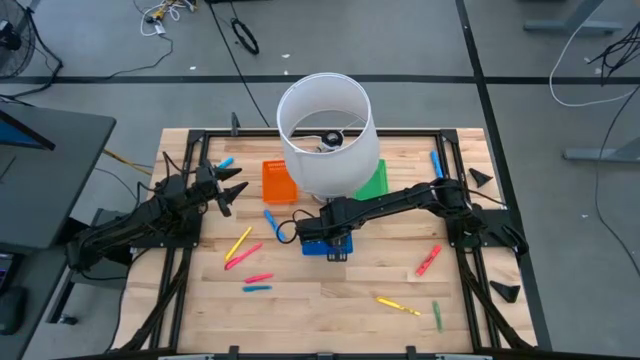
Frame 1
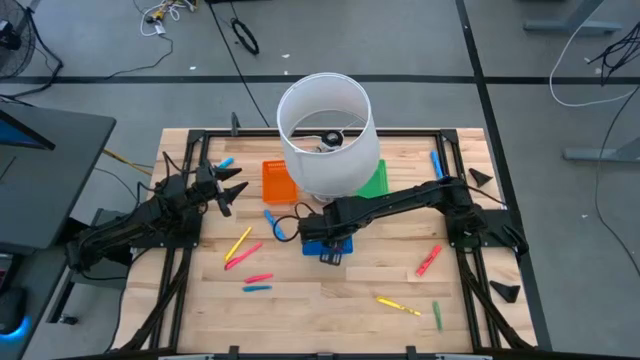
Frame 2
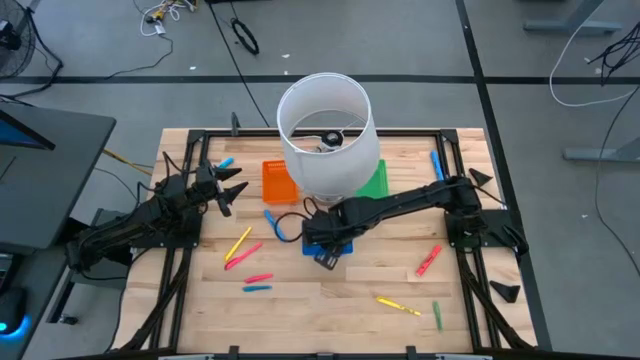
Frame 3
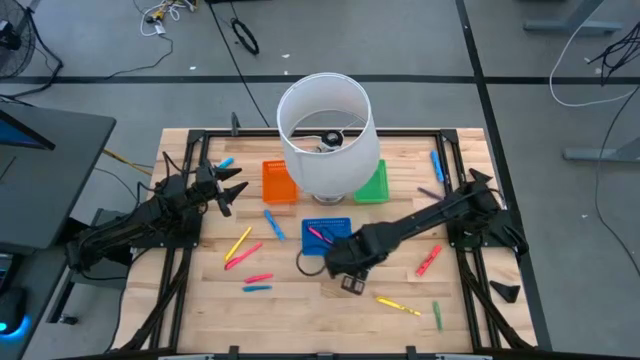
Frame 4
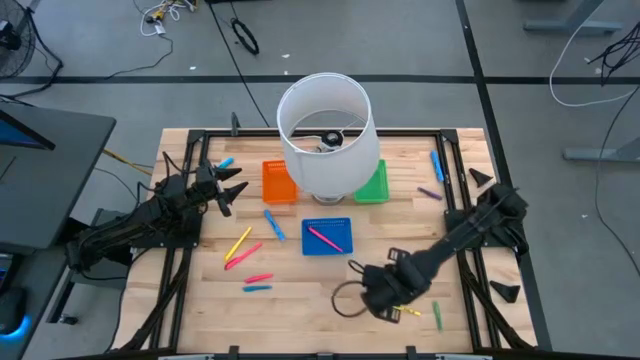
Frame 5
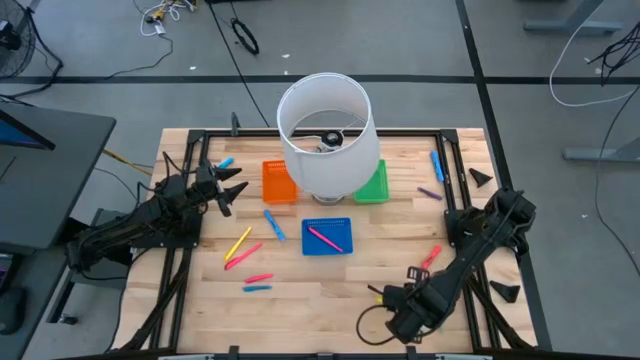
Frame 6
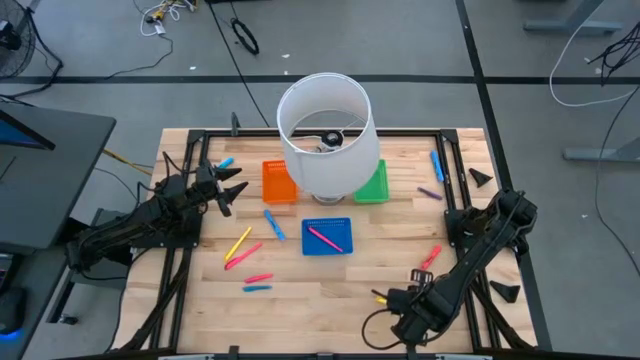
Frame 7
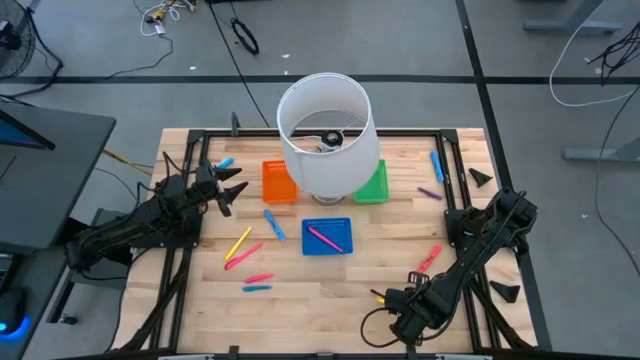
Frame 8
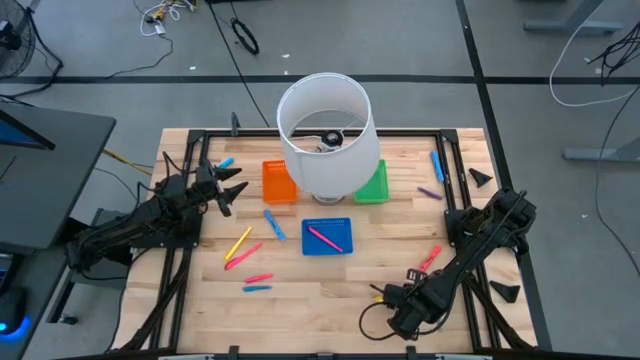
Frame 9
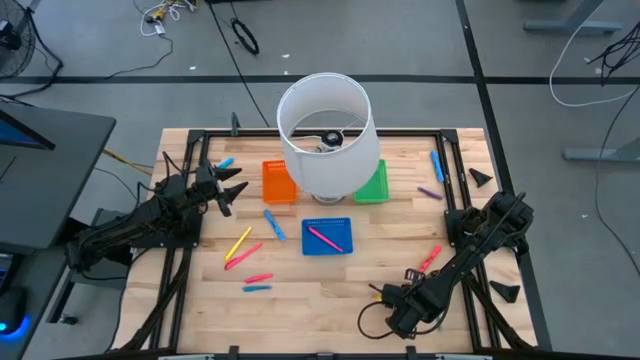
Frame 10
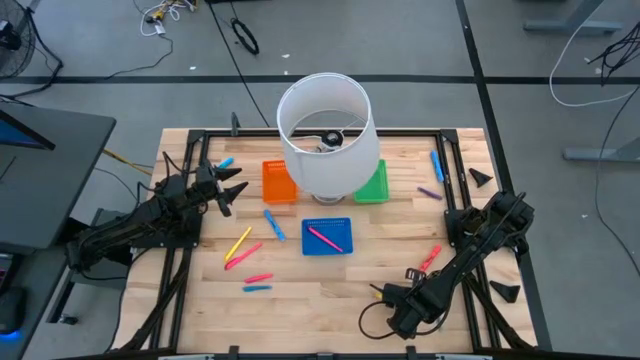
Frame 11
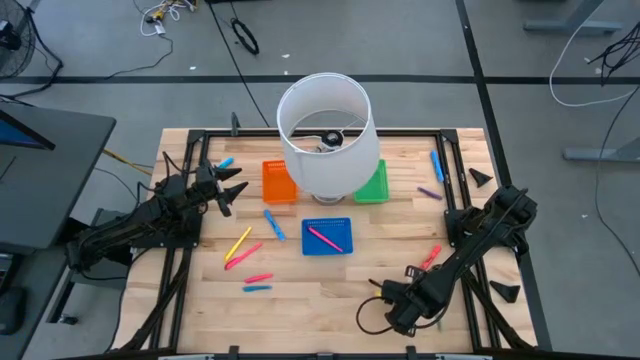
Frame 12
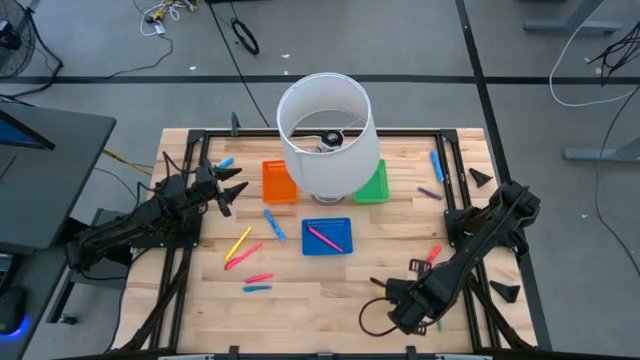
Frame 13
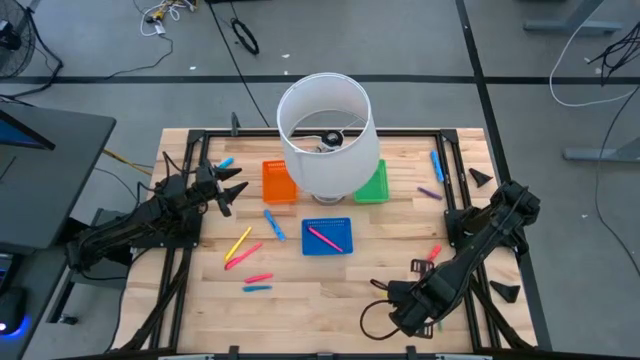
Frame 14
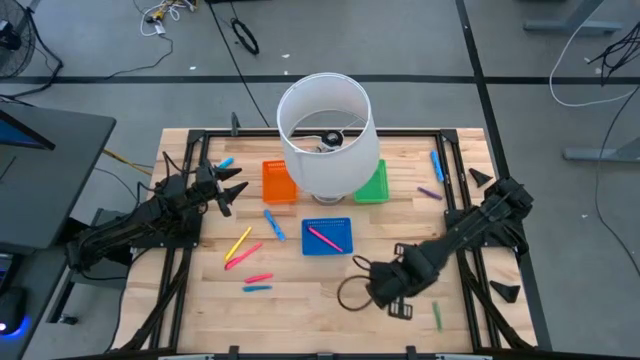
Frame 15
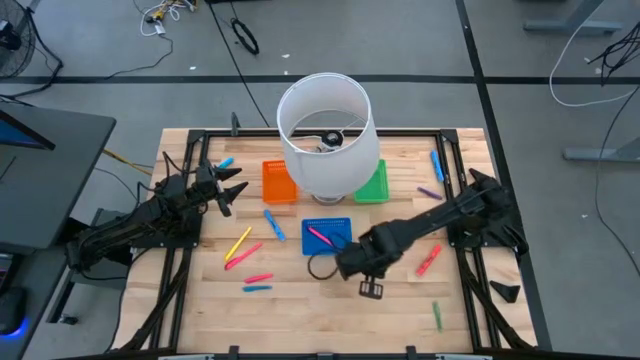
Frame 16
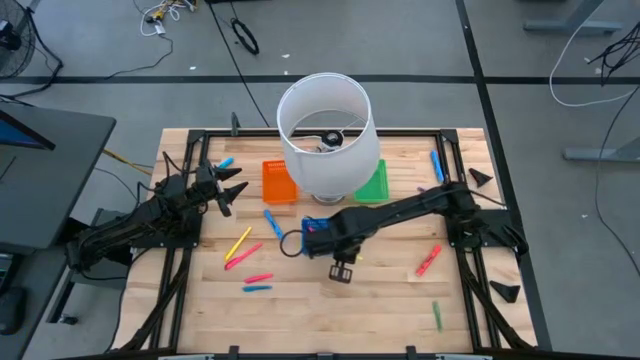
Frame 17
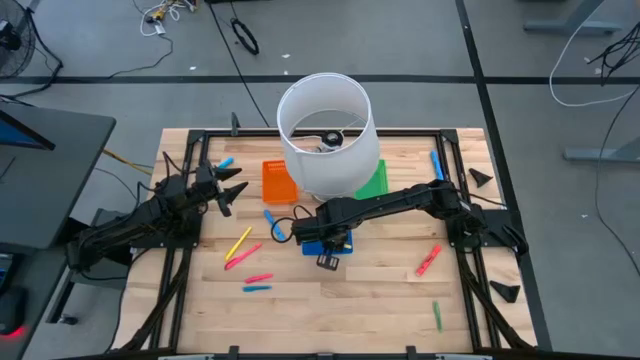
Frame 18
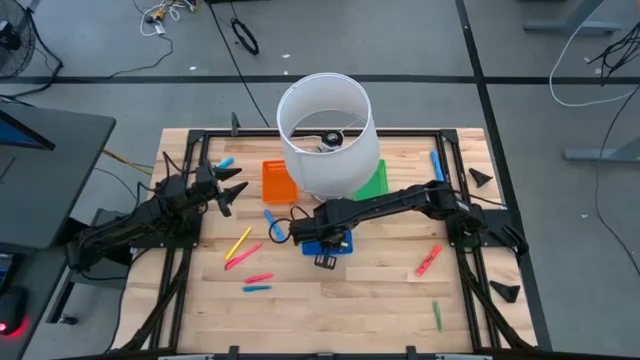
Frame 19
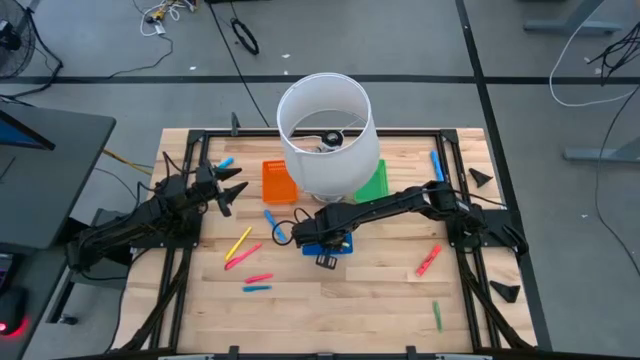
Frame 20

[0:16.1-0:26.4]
Task: Pick & Place Markers
Put the right yellow pen into the blue bin

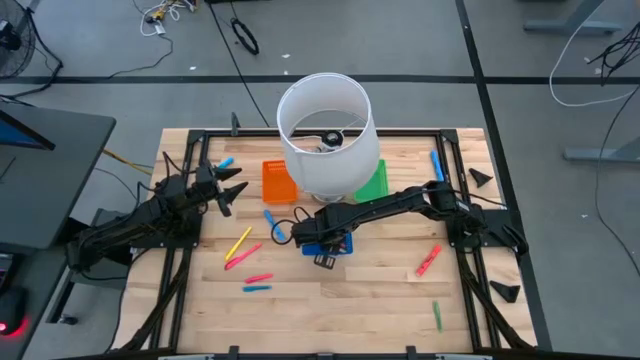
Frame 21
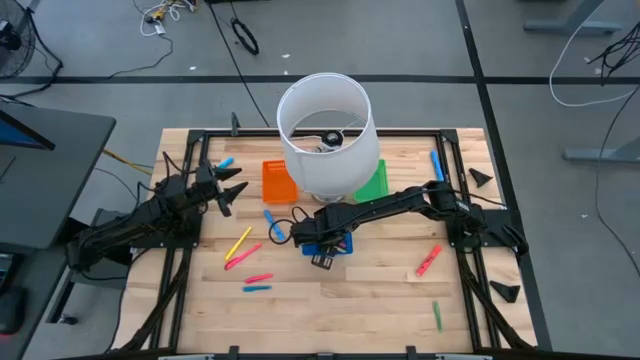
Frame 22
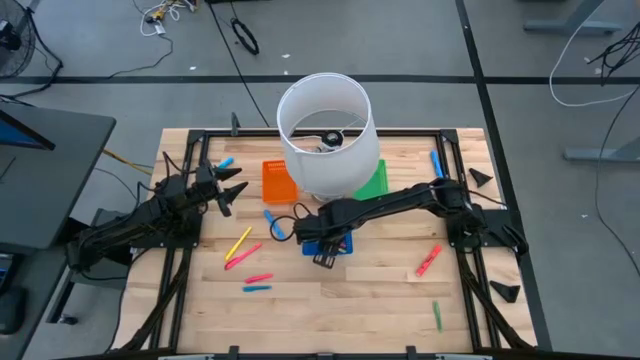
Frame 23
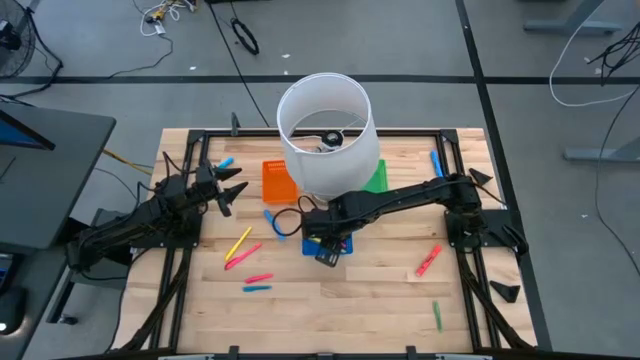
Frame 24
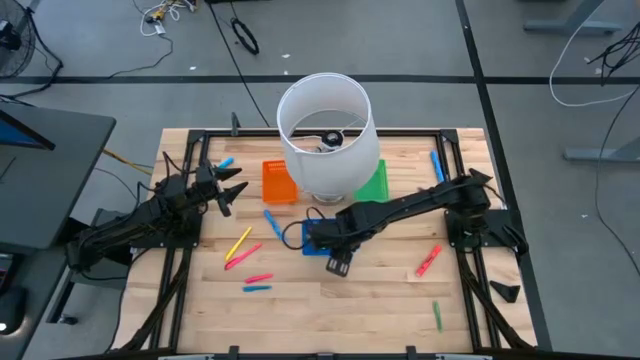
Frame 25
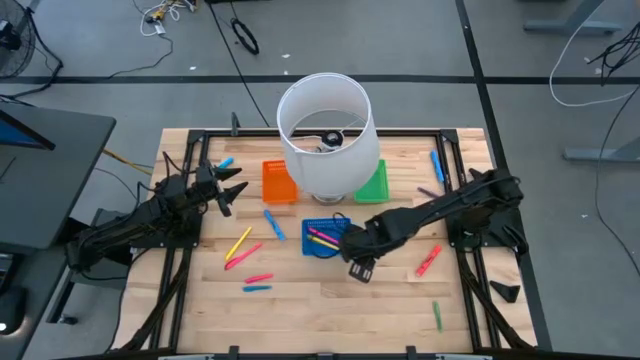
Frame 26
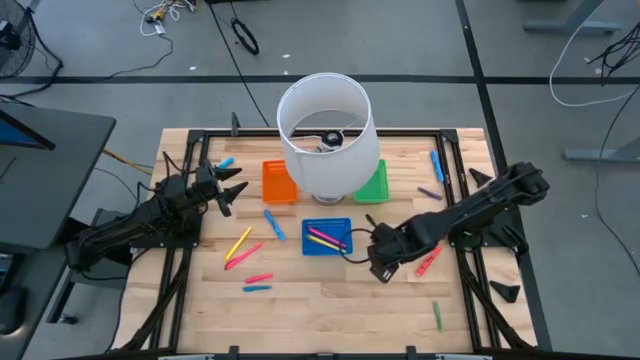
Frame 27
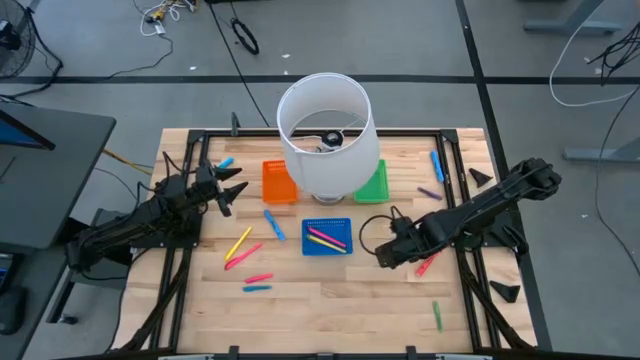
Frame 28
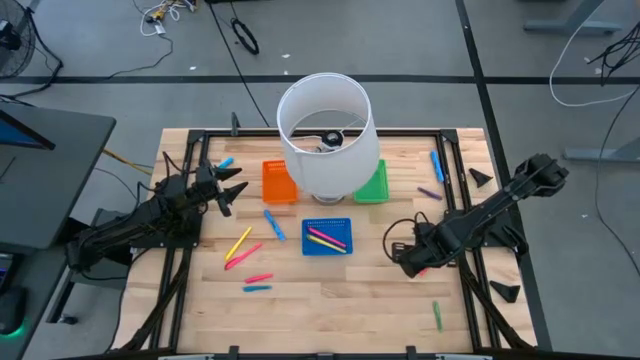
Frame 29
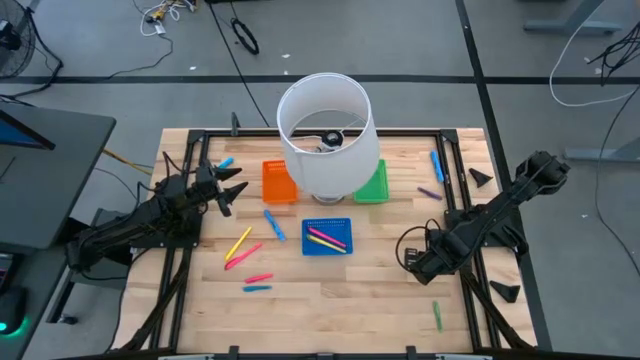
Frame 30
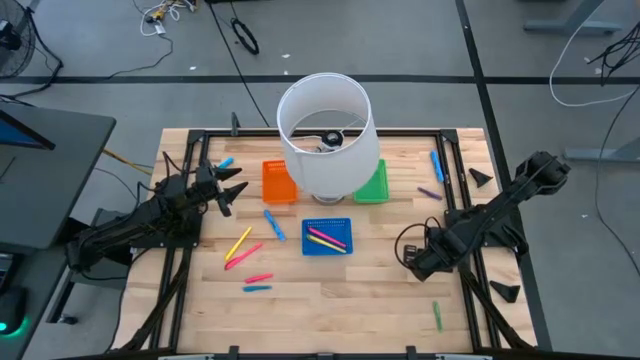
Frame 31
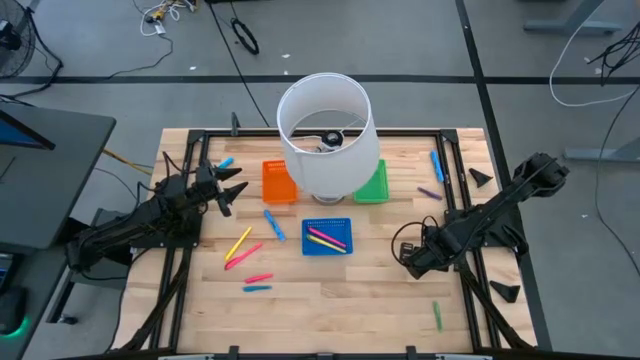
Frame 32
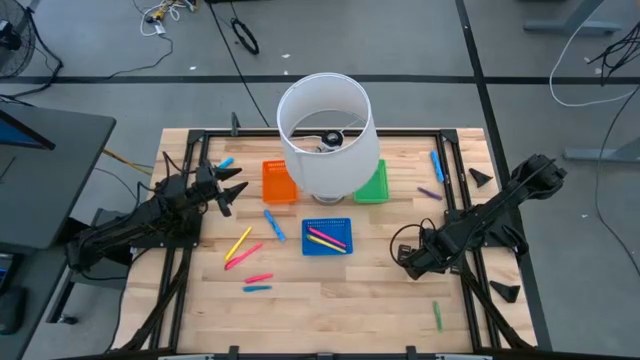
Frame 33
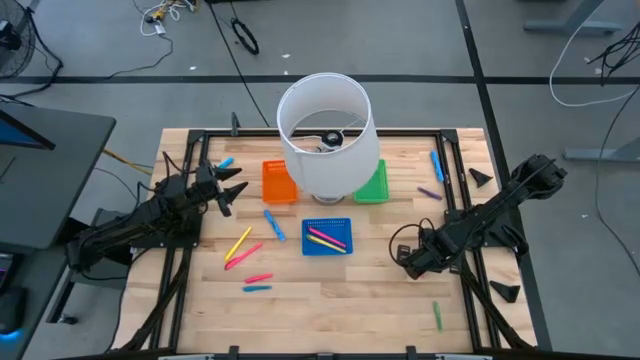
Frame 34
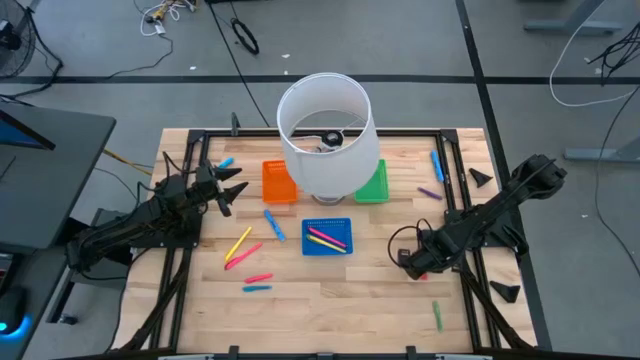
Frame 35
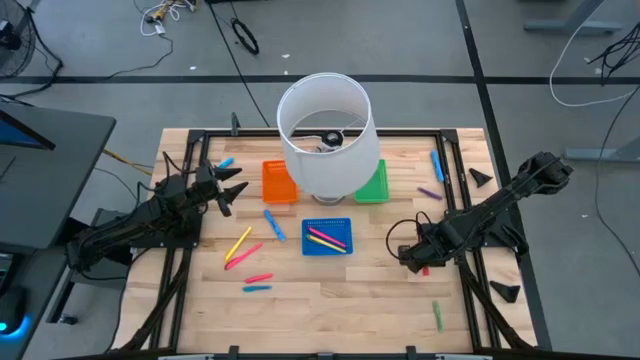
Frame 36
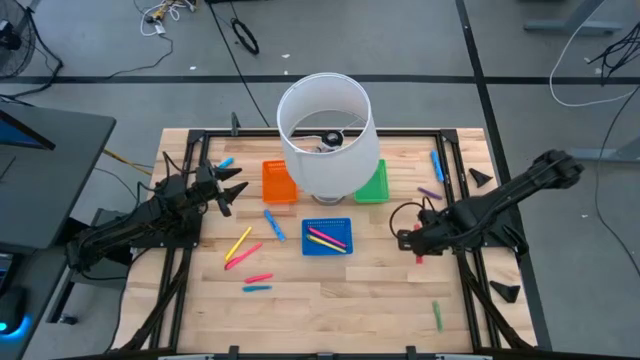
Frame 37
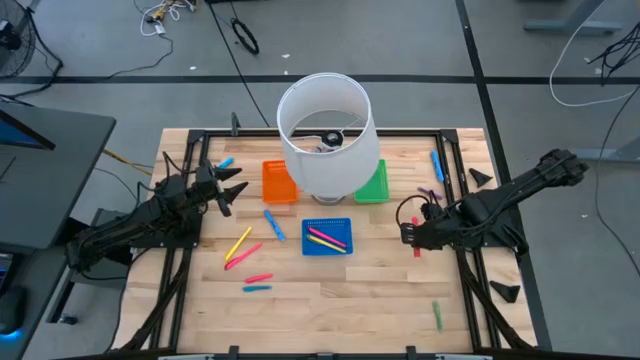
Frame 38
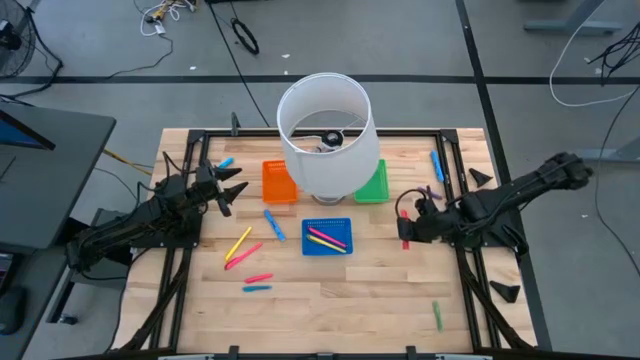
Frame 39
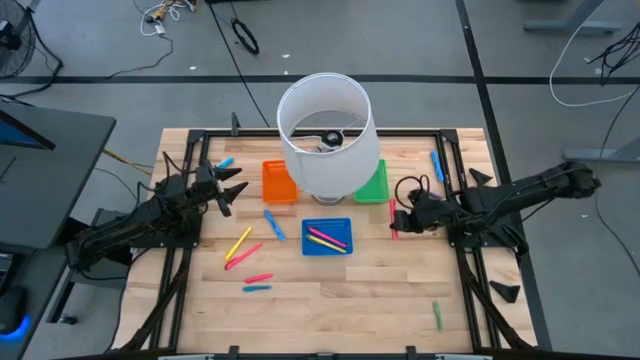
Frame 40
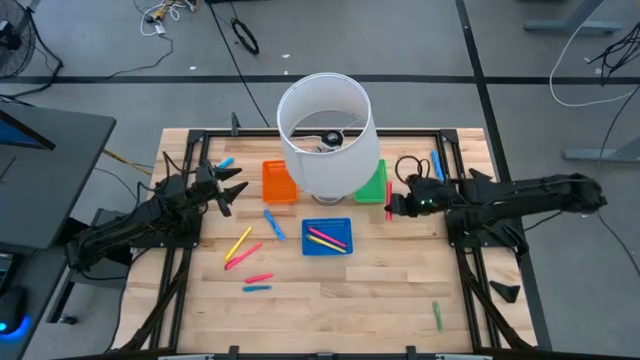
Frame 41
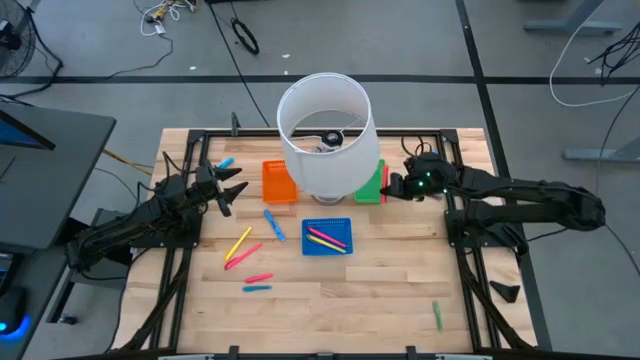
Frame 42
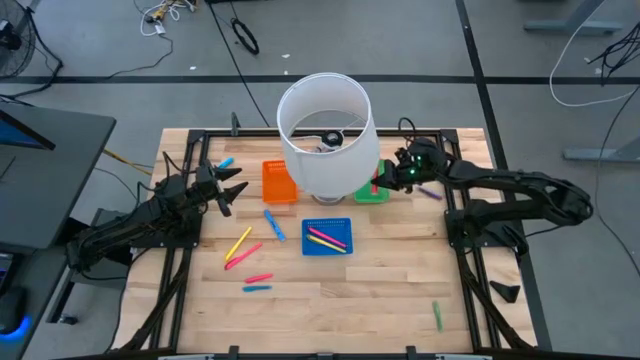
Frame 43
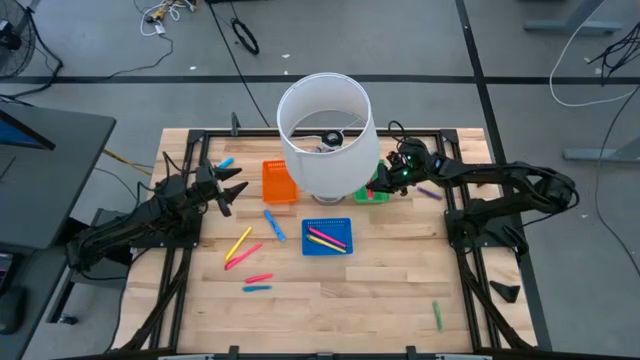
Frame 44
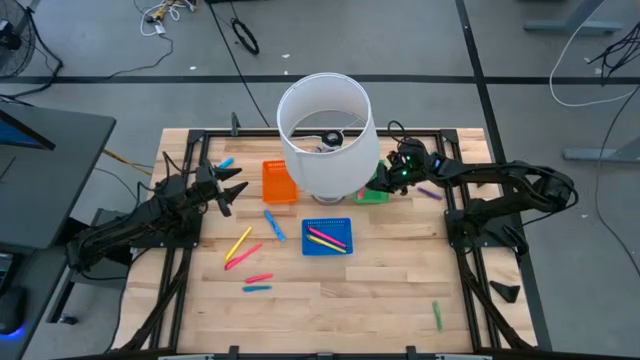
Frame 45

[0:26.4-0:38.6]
Put the red large highlighter pen into the green bin
